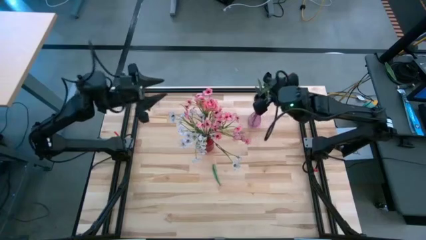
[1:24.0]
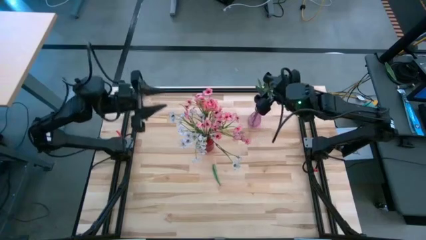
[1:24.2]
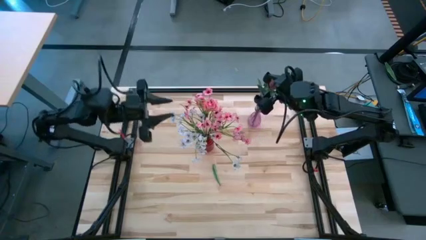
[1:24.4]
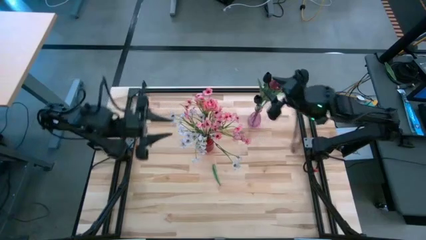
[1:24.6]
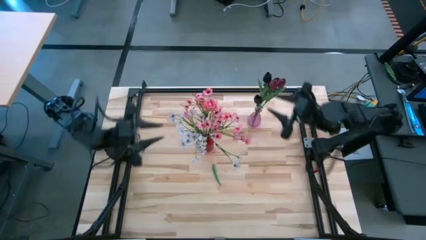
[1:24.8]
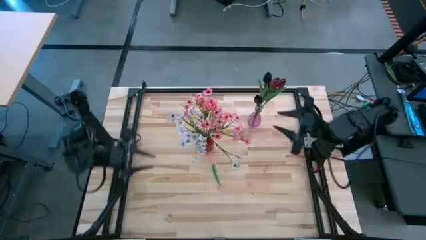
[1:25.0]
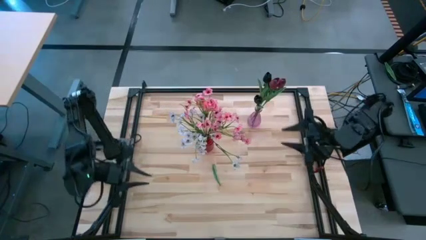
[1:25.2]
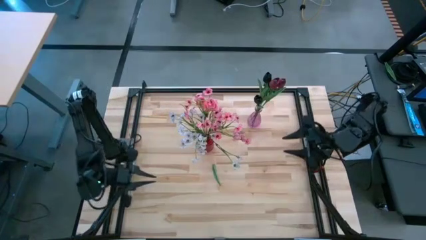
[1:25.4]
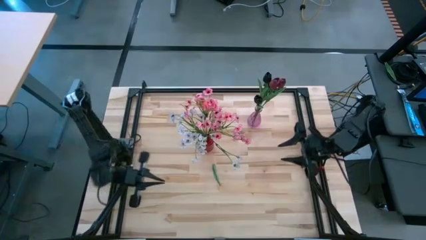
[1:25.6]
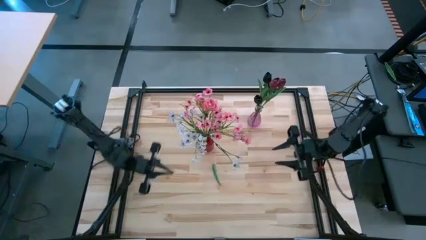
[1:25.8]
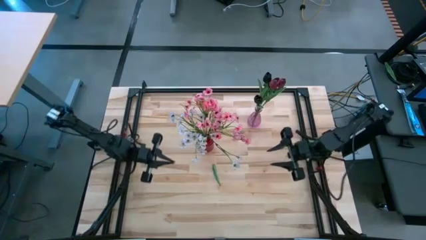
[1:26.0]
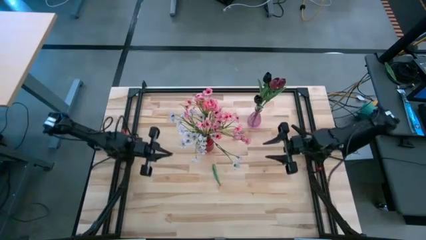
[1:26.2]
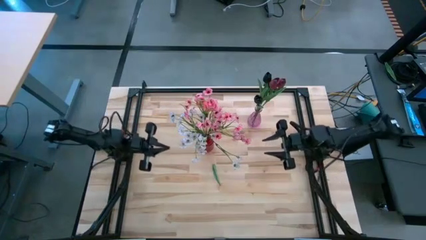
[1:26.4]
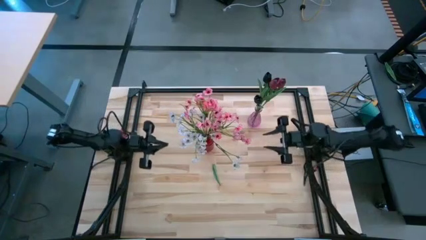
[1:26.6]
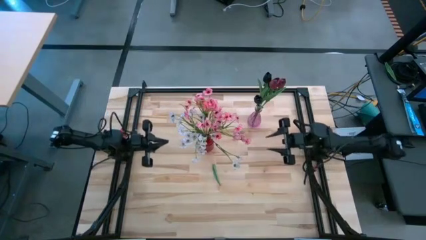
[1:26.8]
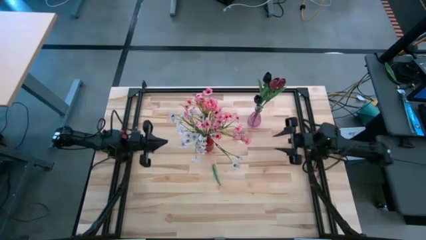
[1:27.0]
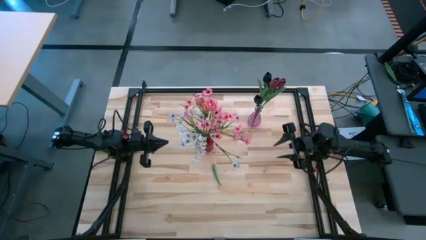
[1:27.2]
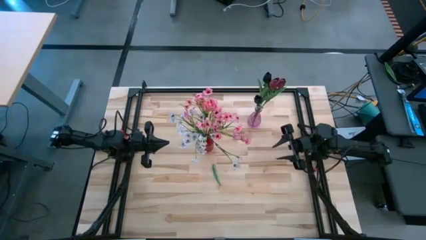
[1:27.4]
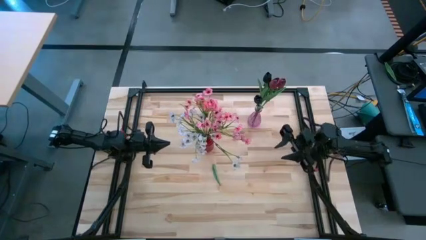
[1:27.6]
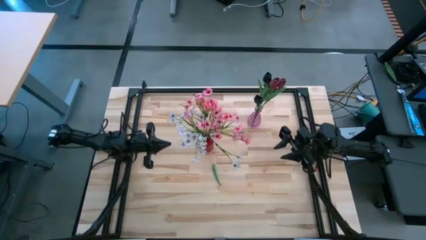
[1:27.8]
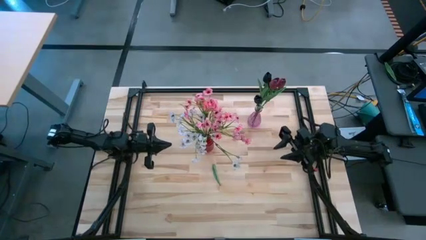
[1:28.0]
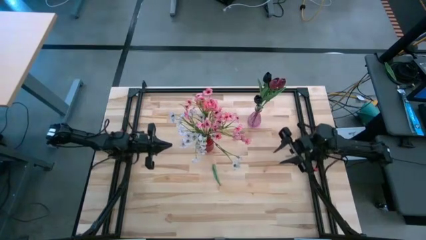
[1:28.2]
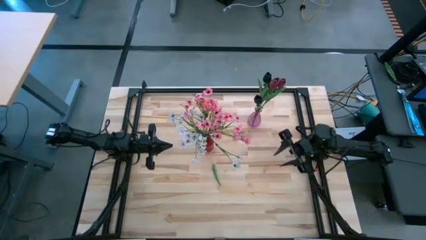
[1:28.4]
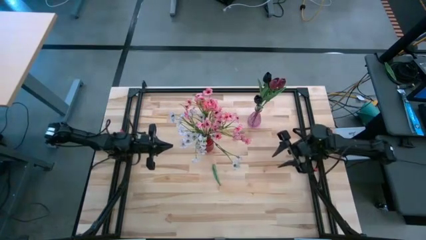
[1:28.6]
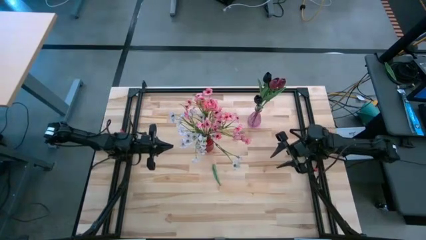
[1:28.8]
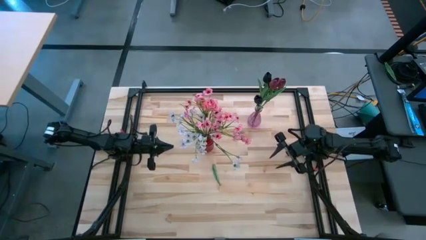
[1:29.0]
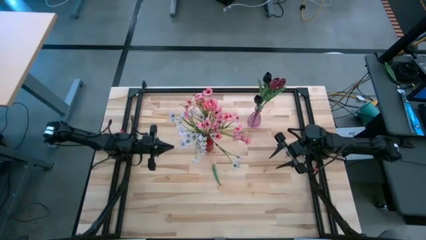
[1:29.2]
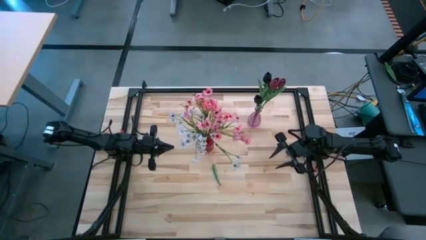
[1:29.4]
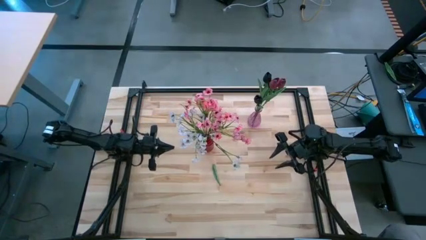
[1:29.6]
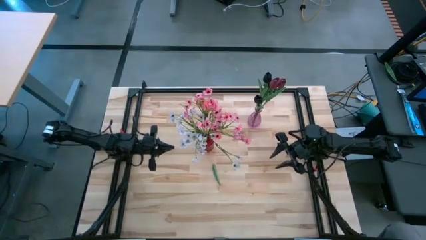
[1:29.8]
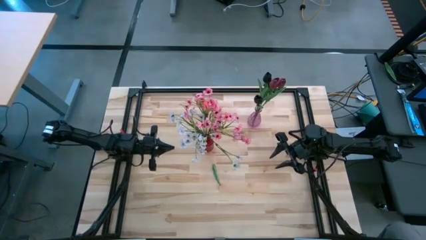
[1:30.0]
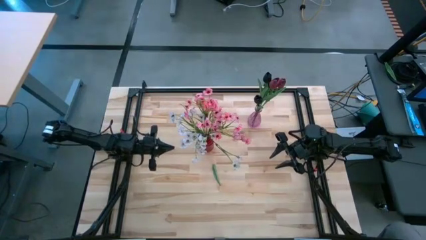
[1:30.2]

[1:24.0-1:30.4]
Task: Sort flowers into vase by color
Return to Home Position

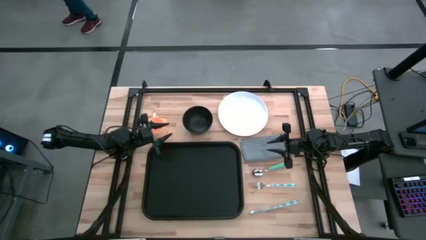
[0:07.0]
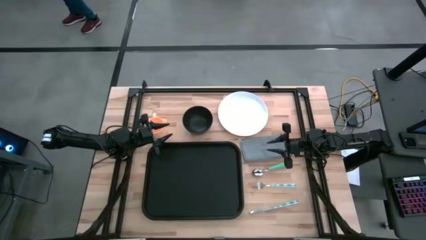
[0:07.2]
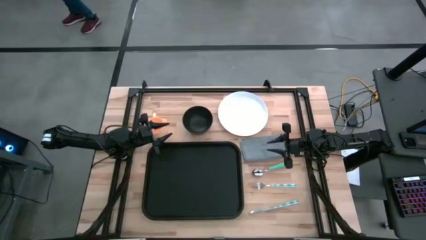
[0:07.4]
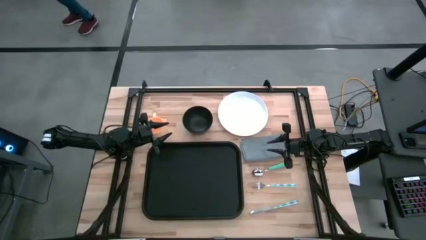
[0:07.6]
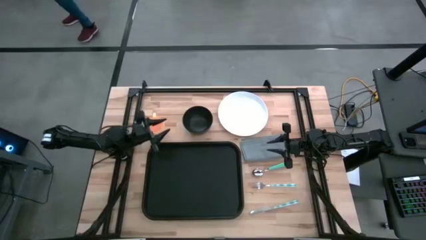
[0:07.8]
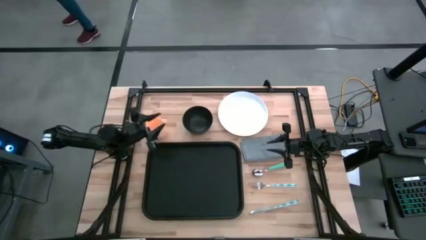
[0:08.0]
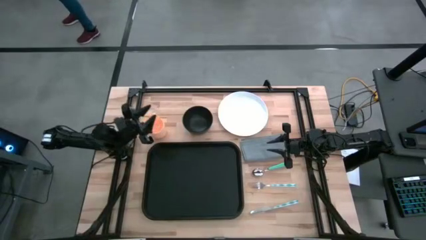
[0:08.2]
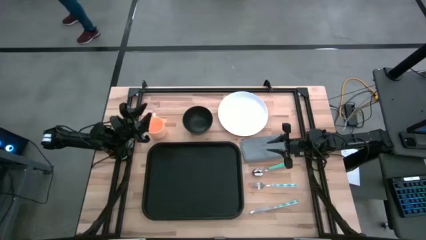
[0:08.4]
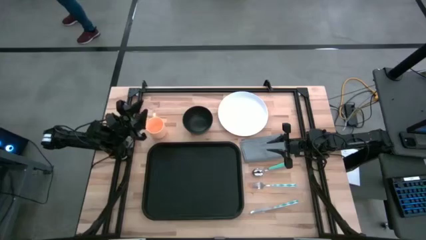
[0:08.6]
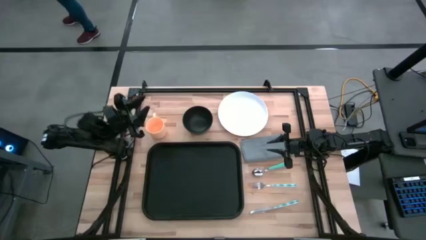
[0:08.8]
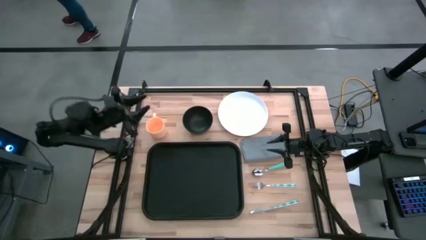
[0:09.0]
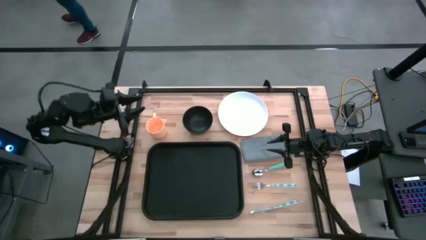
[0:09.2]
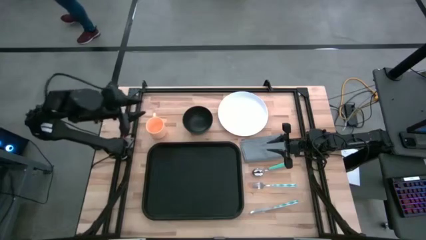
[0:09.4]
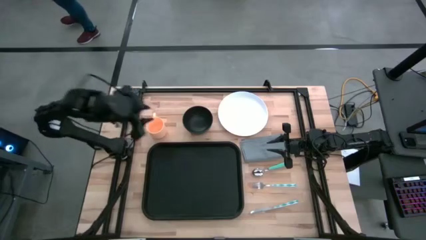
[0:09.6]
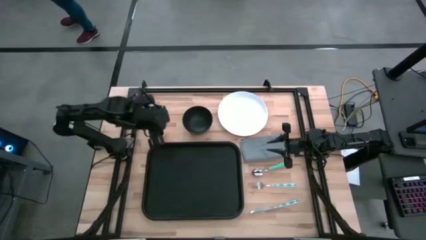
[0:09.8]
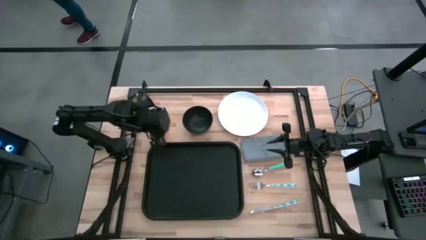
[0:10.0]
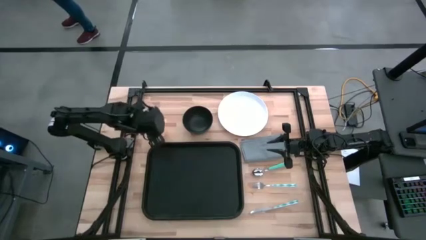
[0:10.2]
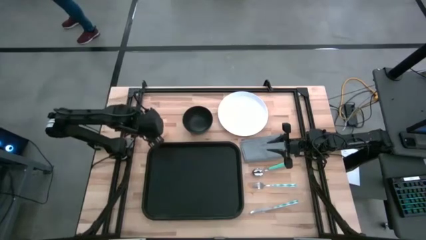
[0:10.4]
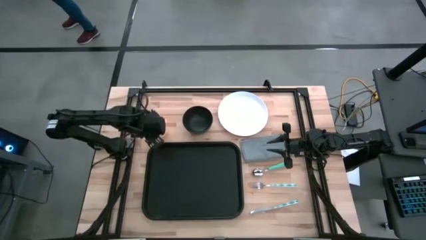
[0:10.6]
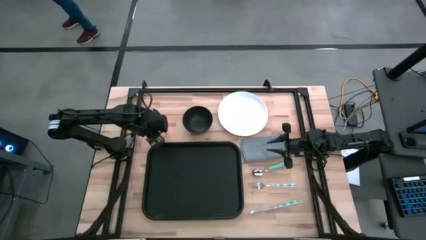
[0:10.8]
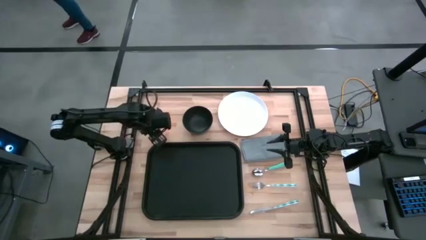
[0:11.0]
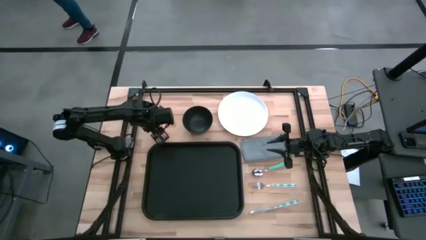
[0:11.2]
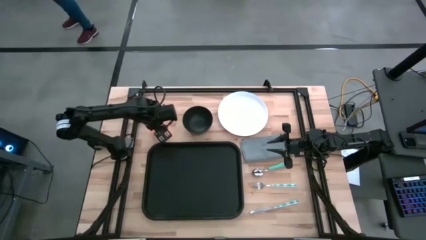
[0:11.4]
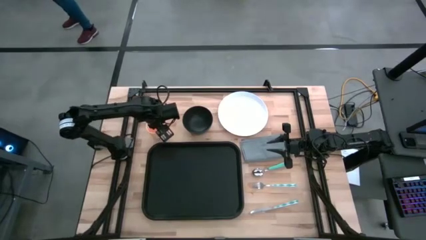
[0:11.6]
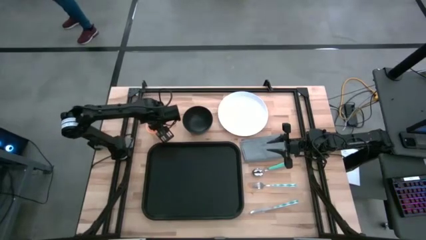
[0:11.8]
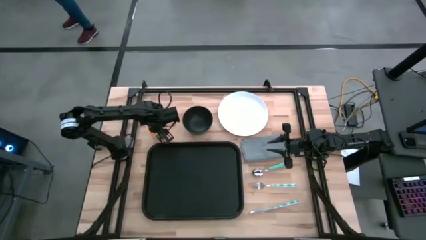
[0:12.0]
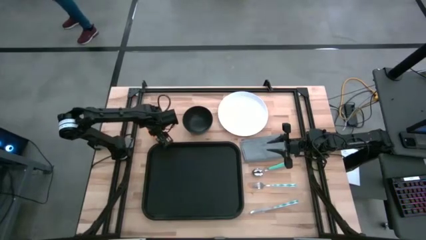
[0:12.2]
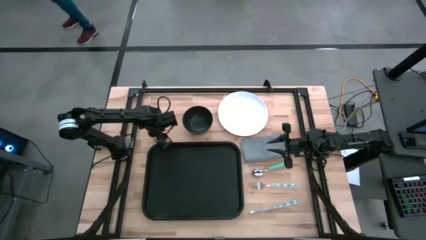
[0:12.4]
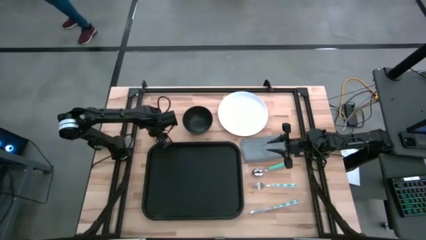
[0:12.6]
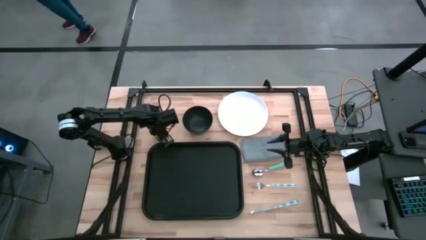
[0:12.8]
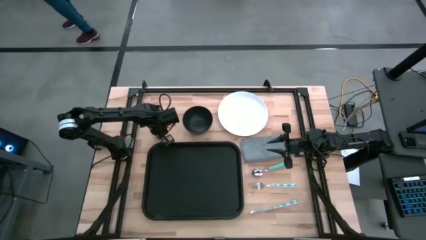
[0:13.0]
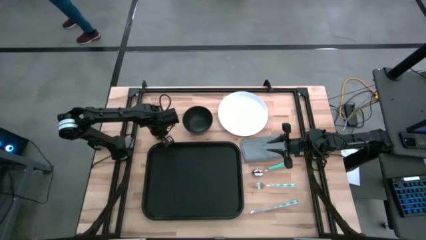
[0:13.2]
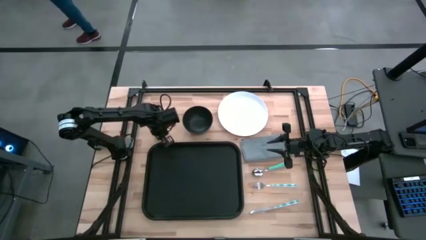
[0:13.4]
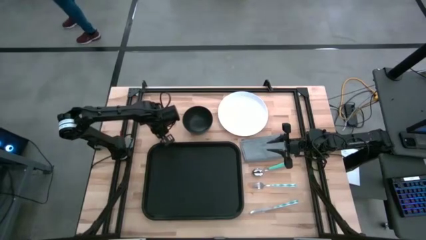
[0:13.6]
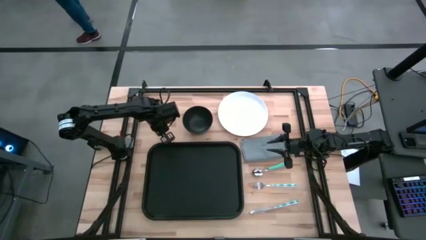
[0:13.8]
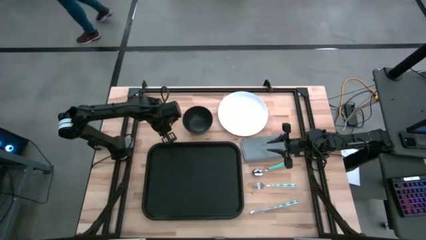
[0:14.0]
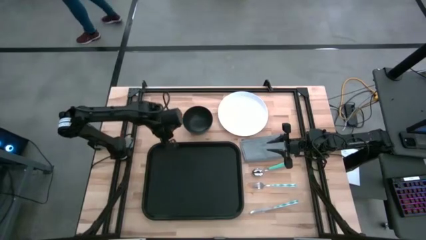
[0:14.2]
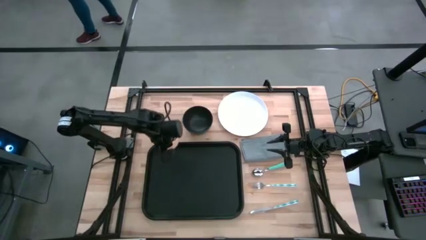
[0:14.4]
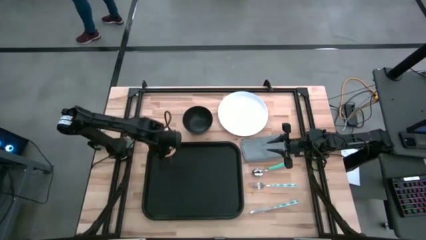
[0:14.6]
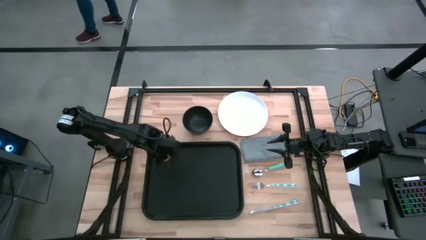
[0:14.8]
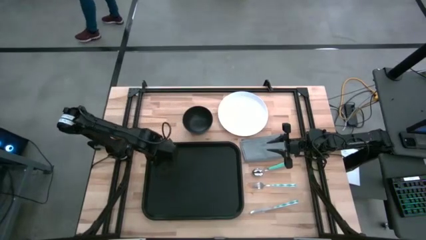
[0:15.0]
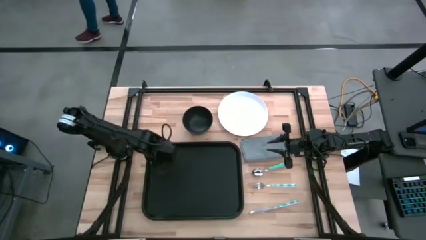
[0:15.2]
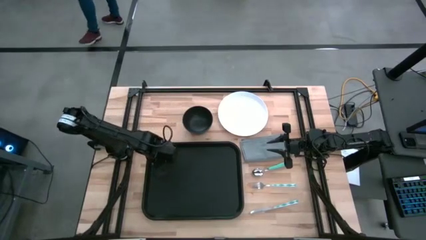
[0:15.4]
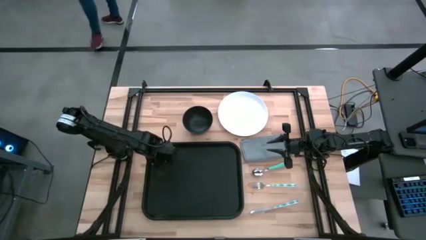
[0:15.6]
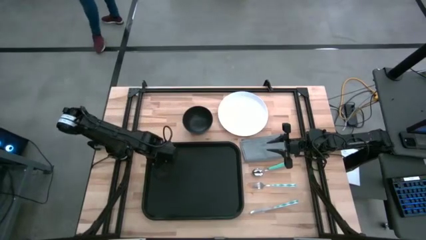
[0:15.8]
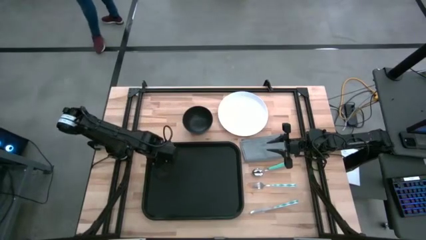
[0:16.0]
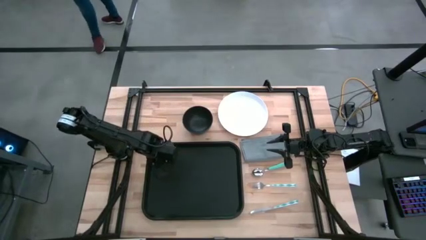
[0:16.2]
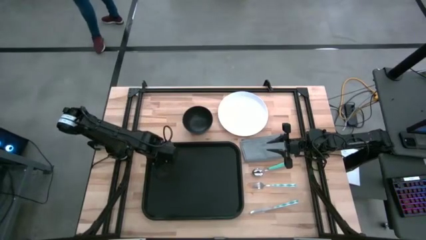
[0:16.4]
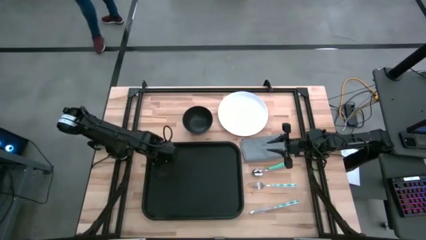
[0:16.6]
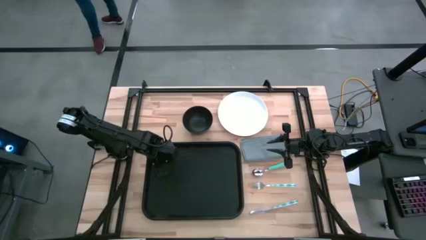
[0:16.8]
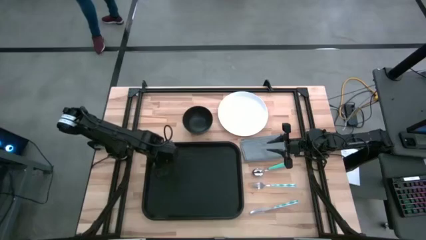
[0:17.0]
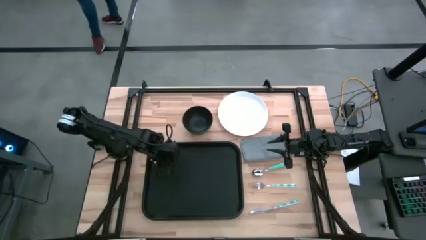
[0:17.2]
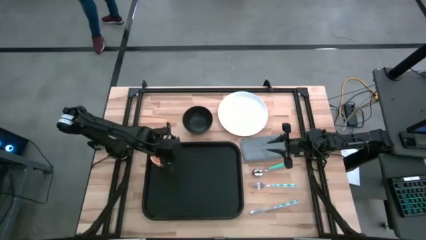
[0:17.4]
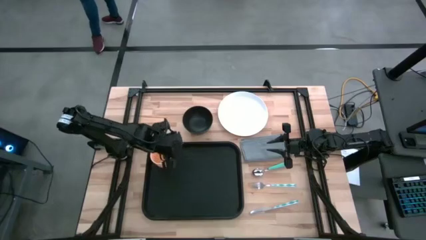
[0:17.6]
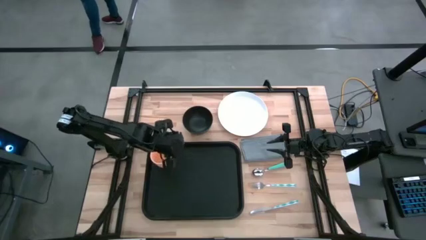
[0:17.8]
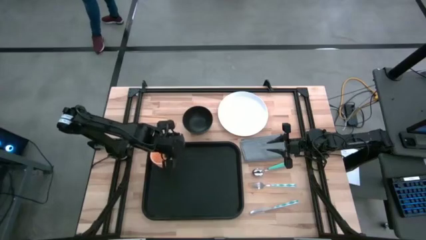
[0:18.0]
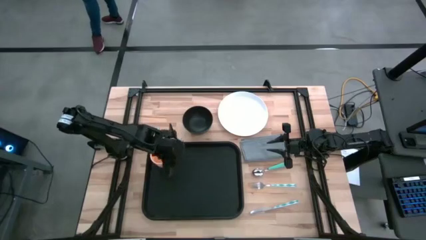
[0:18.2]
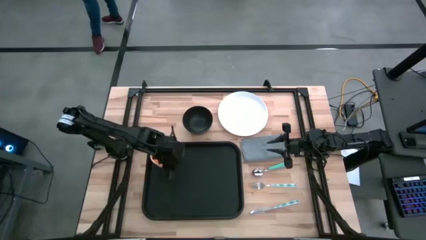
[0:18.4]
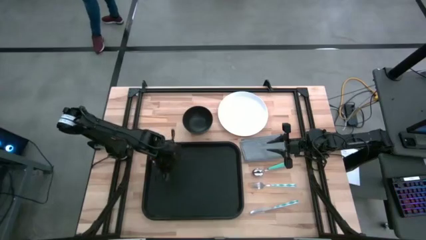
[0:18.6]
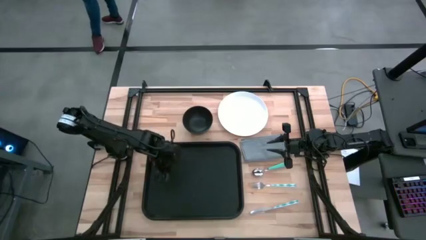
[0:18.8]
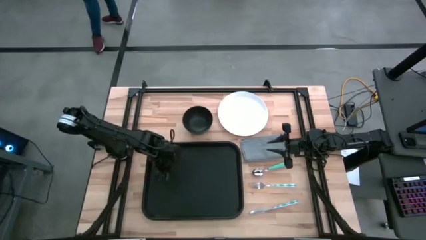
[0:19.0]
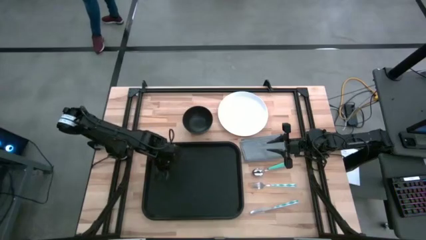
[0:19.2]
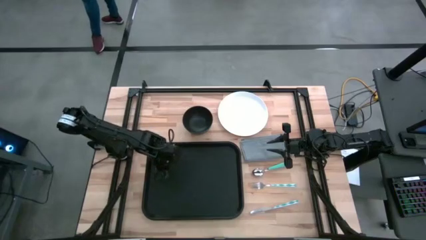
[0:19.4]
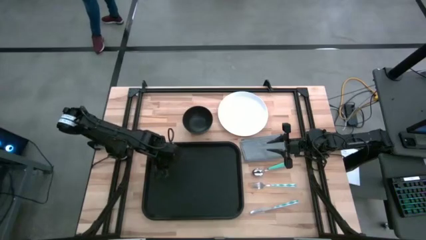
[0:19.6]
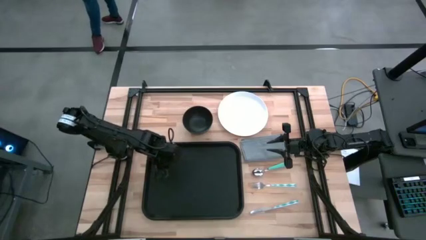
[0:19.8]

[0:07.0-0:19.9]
Task: Set up tray
Put the orange cup on the top left of the black tray
